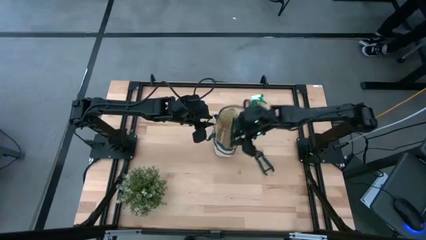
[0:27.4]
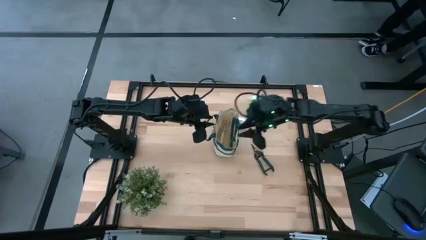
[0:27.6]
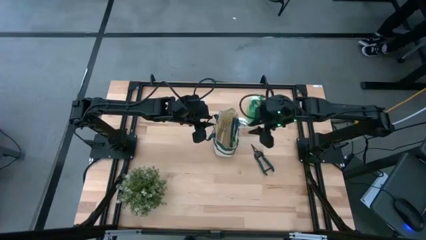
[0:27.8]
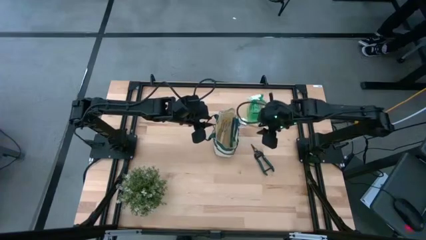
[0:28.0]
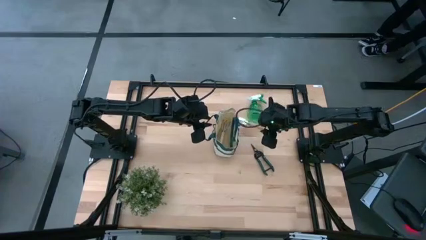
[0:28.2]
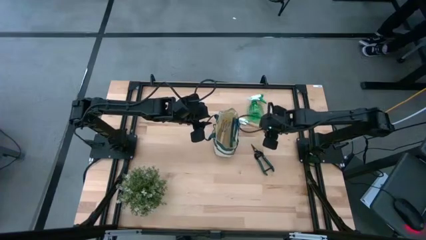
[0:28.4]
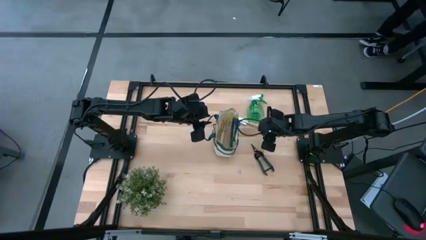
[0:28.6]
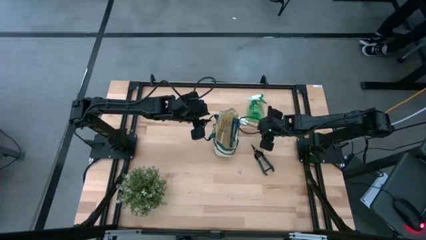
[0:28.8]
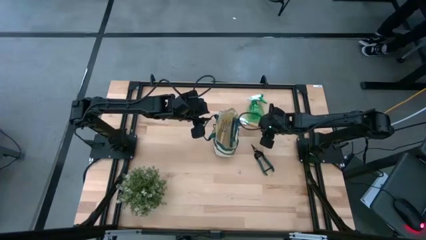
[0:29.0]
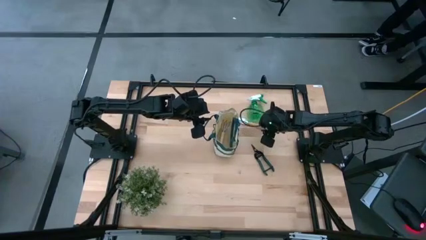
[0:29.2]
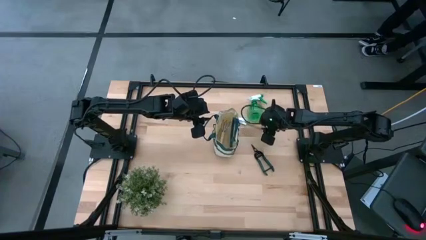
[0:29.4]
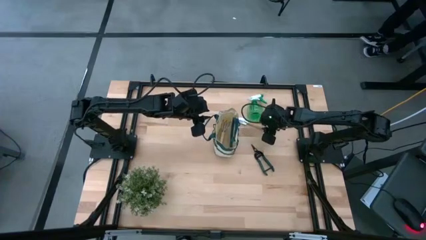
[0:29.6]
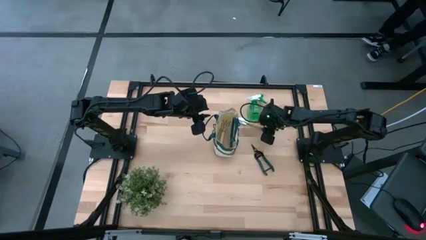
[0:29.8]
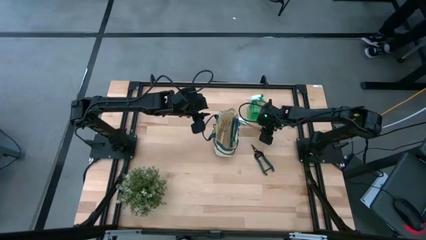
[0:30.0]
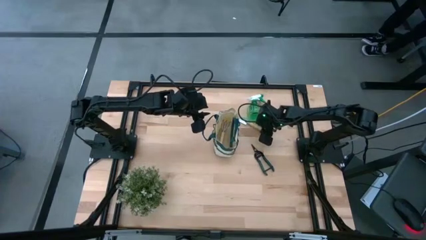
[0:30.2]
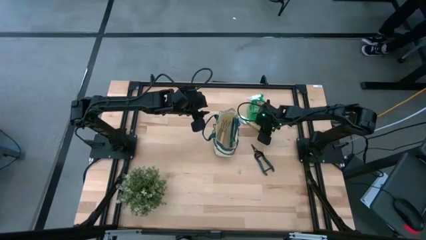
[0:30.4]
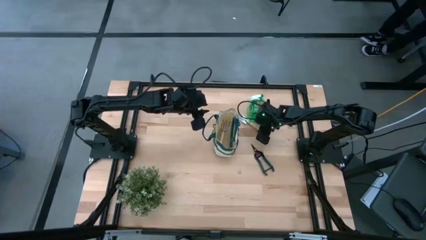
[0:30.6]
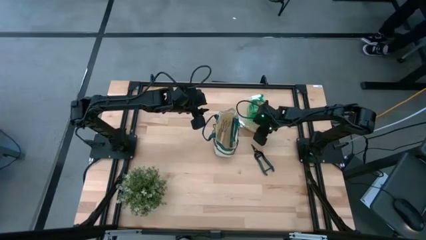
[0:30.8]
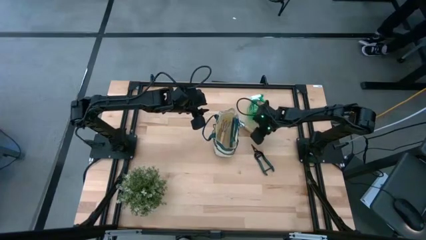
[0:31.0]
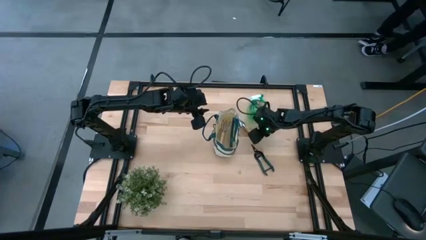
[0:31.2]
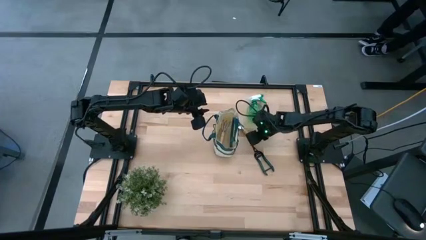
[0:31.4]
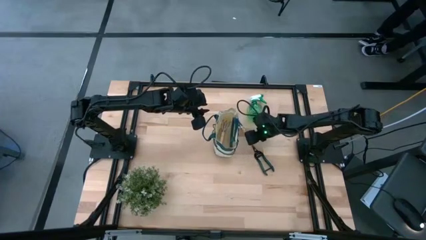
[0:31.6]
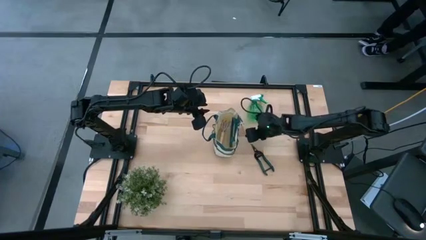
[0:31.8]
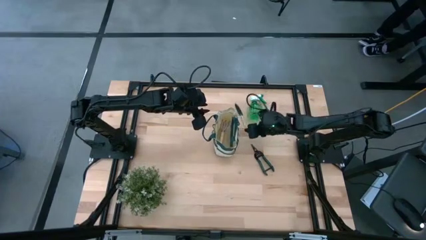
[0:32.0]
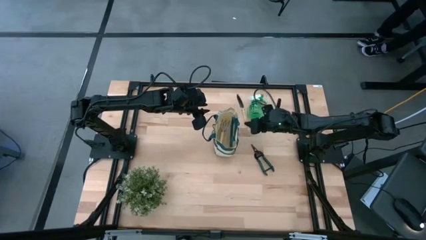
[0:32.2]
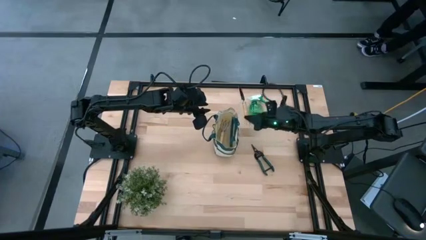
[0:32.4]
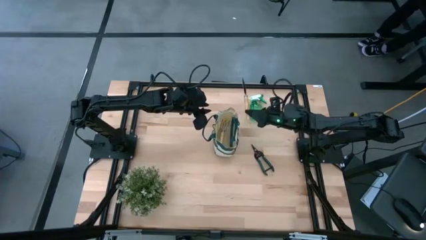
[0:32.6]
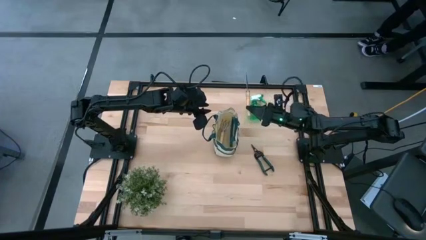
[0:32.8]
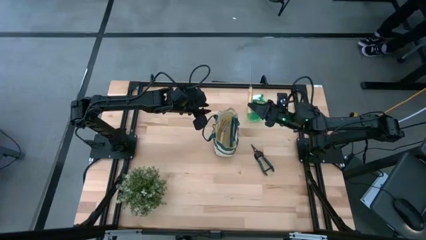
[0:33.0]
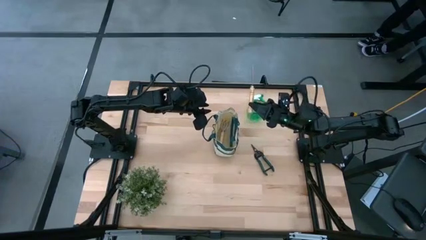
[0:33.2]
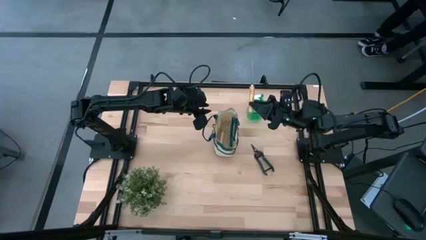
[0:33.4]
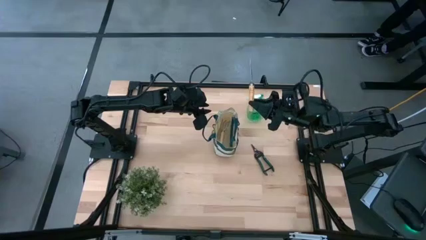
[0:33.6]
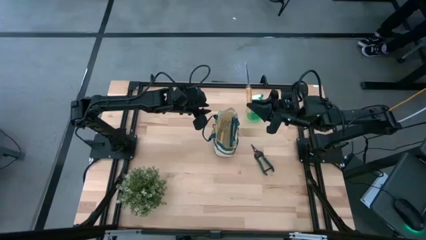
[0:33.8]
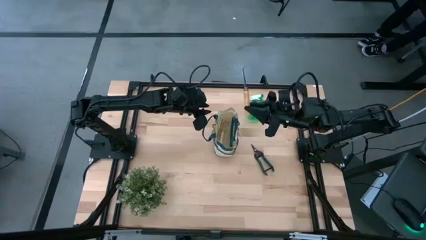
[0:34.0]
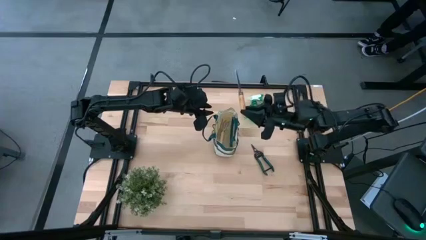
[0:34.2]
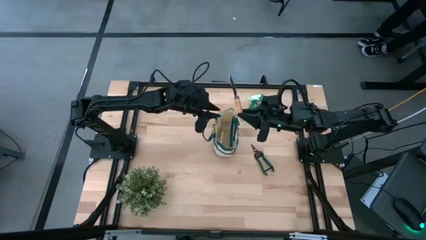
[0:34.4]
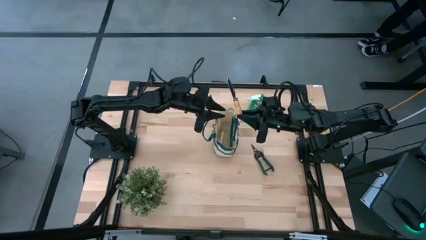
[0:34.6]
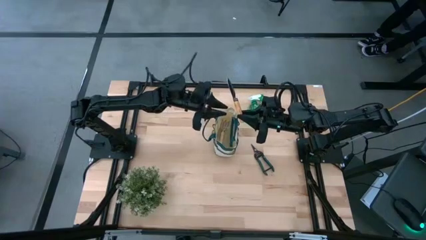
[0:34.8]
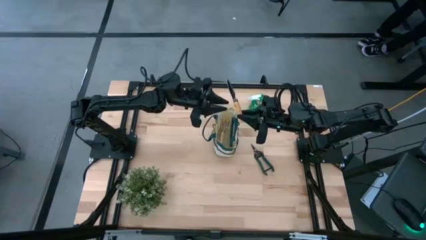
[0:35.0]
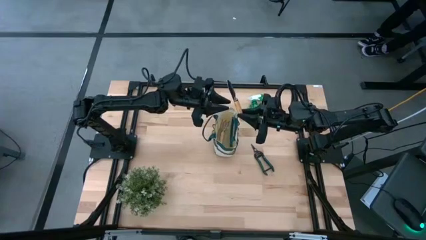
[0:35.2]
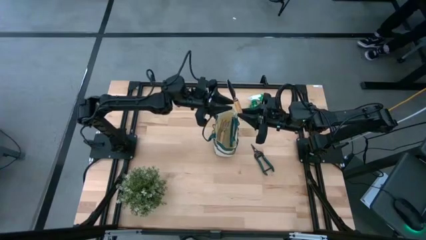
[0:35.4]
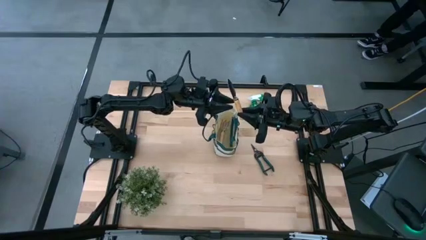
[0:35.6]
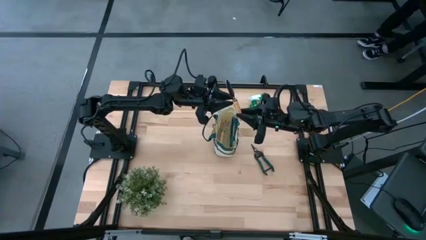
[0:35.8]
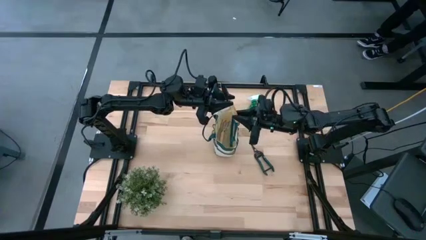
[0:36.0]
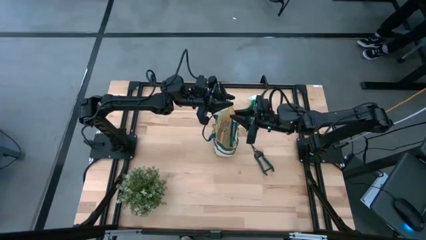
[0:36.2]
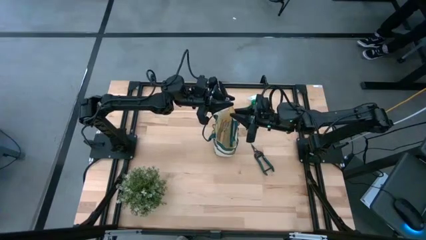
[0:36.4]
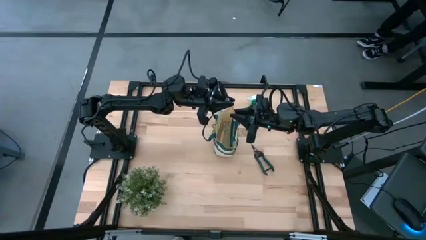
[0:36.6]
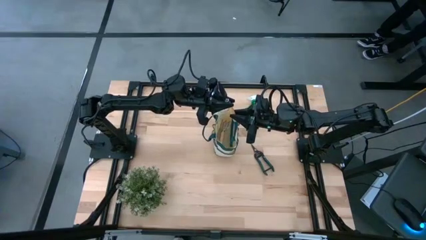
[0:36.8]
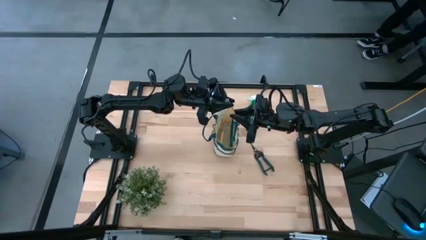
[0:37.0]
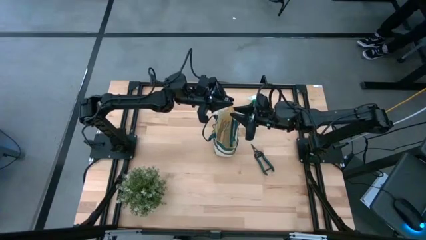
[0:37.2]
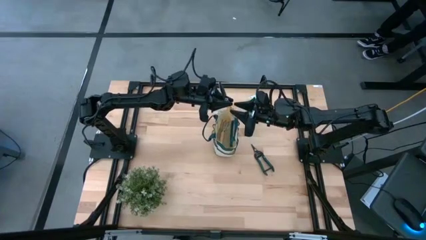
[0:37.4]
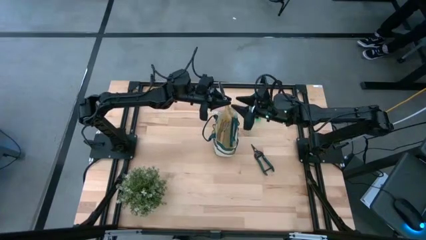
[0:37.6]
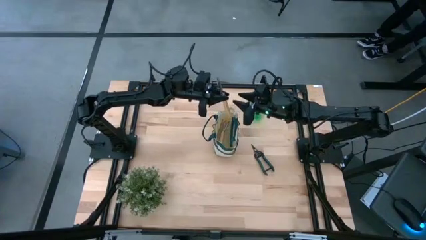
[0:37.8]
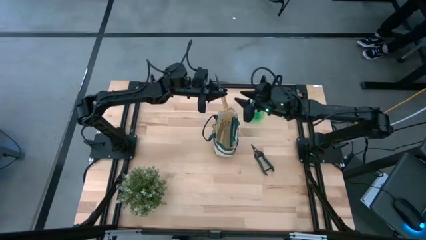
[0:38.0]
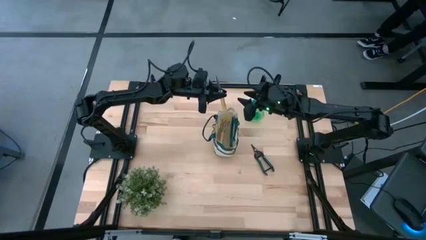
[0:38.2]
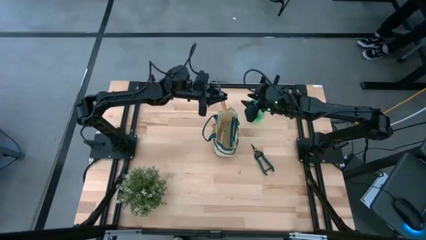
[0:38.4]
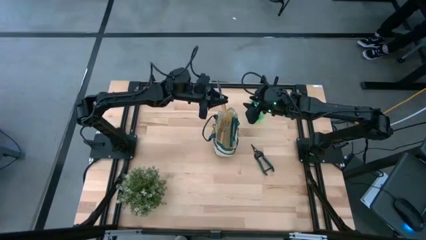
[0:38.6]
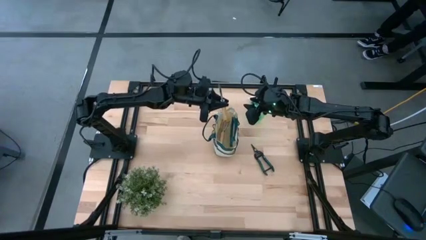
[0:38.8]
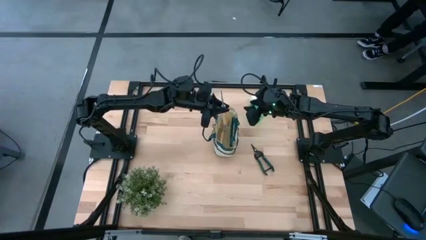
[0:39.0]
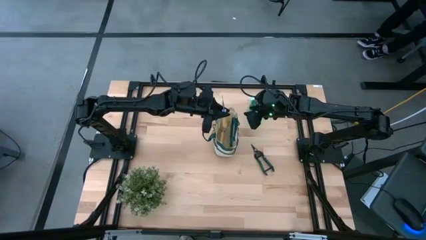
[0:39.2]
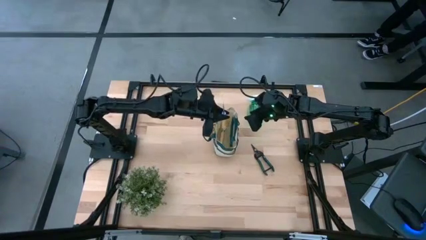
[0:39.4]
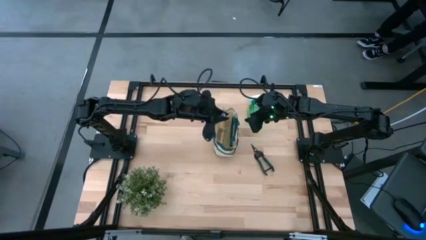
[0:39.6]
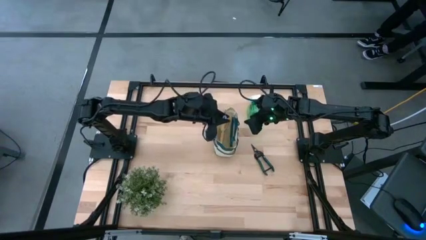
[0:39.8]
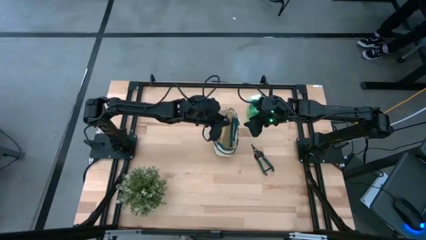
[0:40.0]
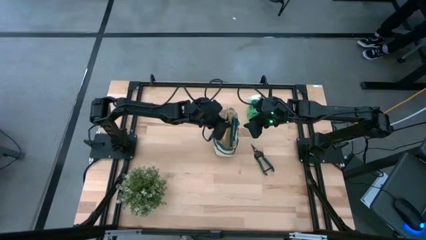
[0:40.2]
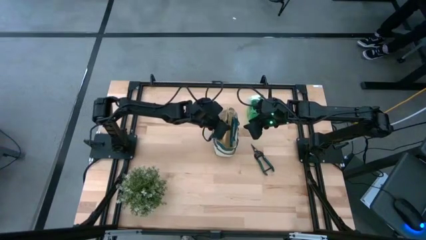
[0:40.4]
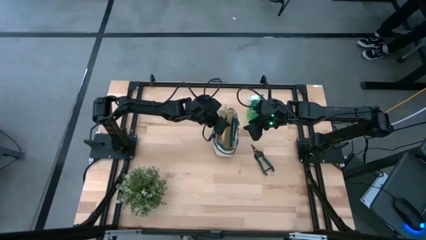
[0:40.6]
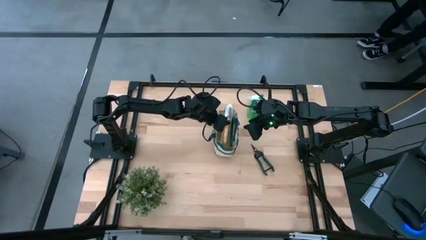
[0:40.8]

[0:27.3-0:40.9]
Task: Pick & Place Garden tools in Gardening bag
Put the trowel into the gardening bag
